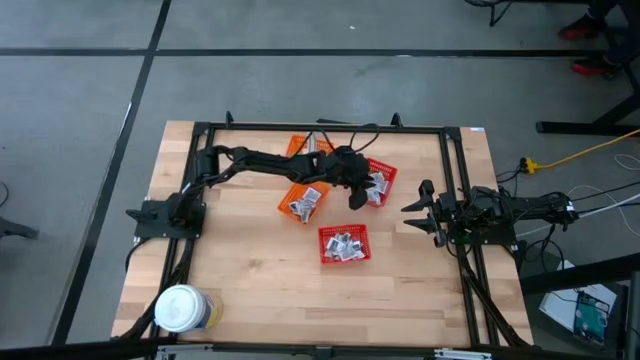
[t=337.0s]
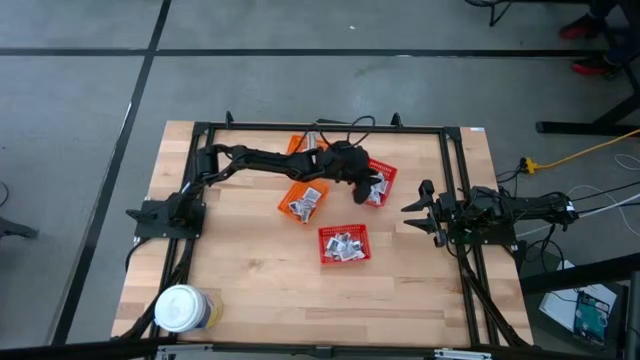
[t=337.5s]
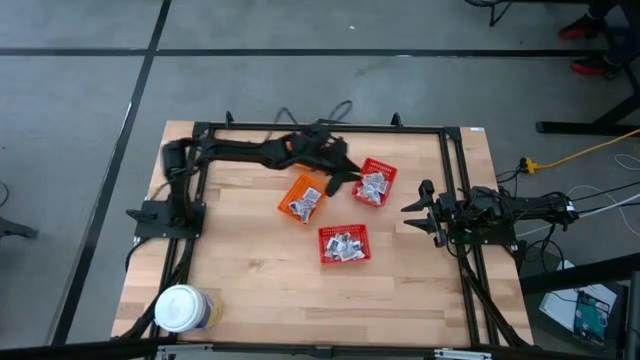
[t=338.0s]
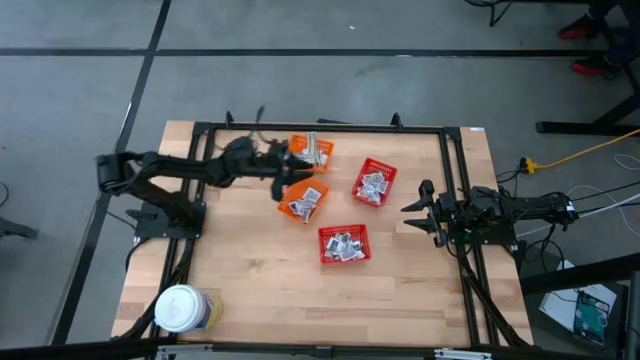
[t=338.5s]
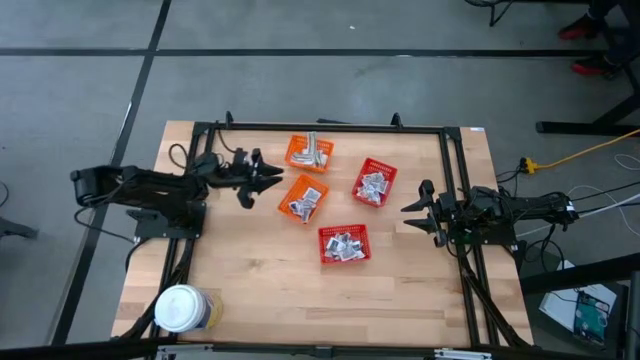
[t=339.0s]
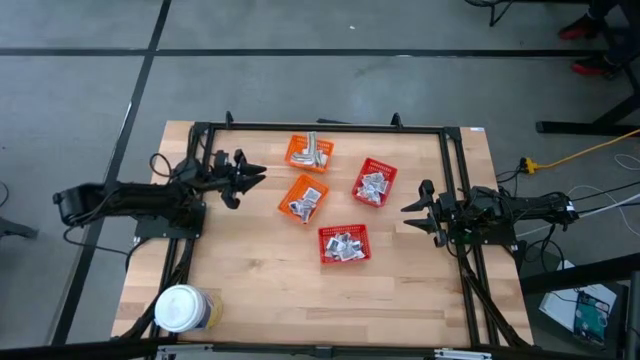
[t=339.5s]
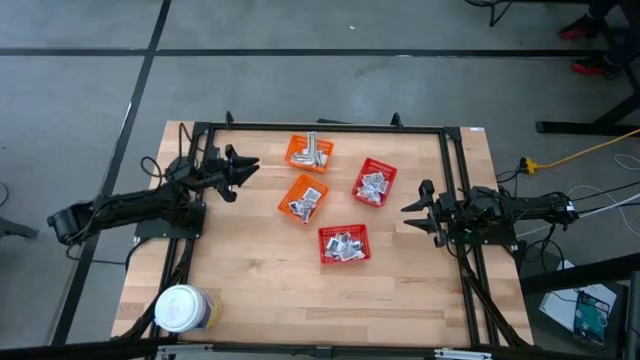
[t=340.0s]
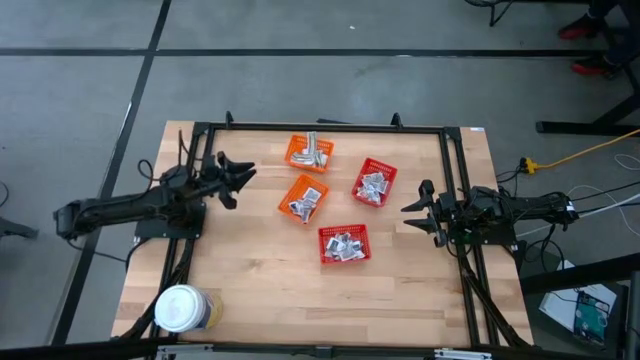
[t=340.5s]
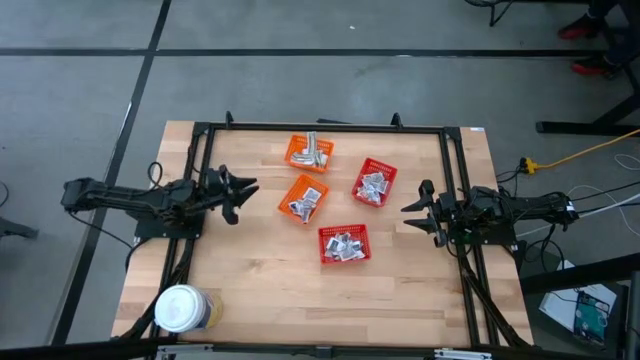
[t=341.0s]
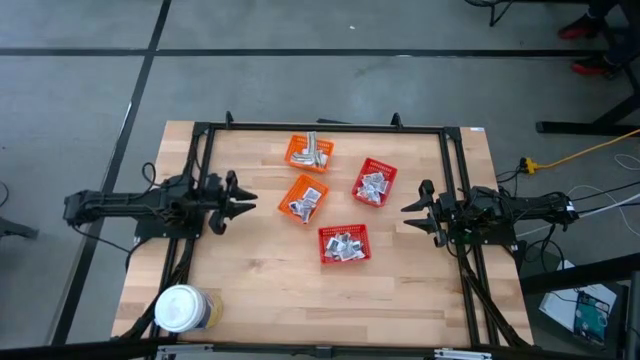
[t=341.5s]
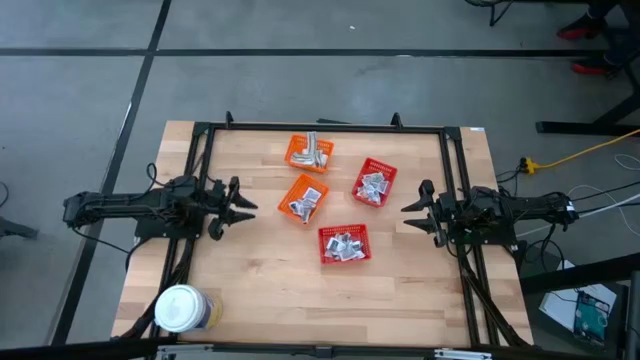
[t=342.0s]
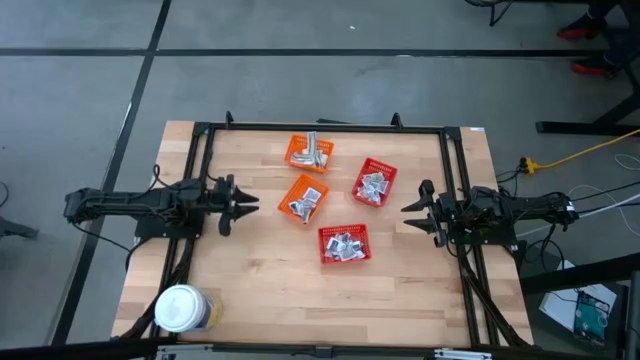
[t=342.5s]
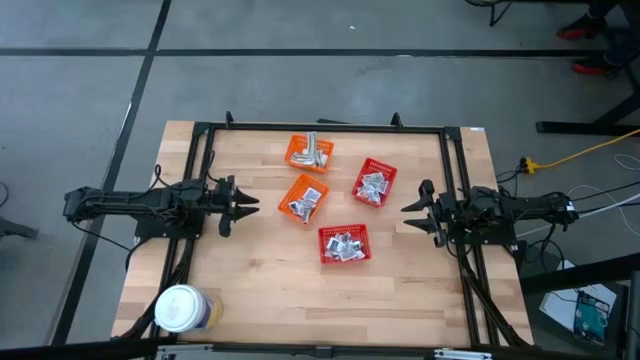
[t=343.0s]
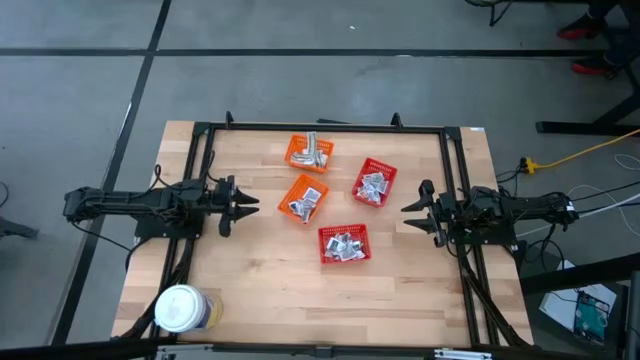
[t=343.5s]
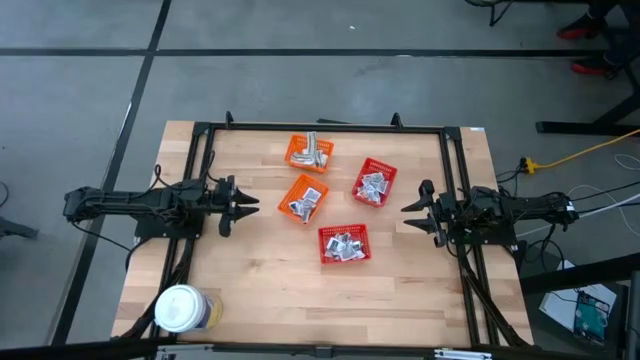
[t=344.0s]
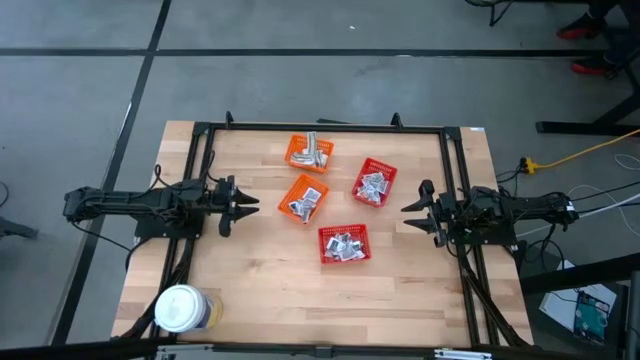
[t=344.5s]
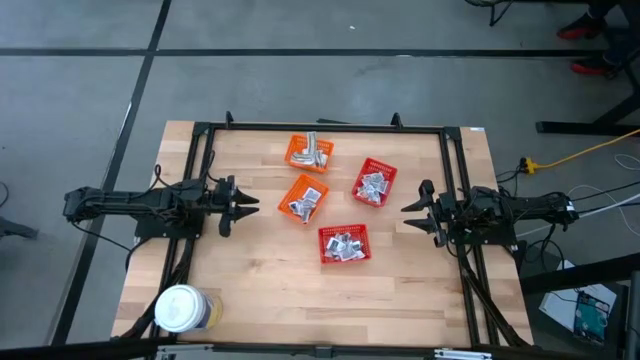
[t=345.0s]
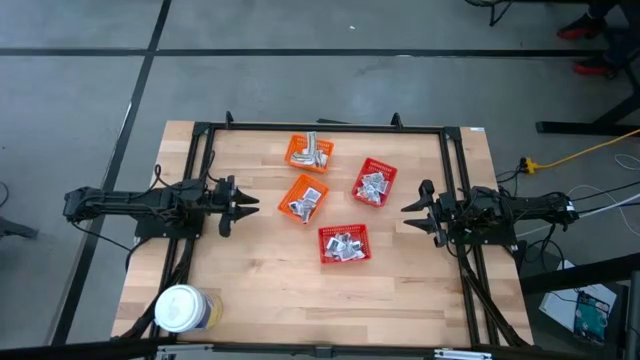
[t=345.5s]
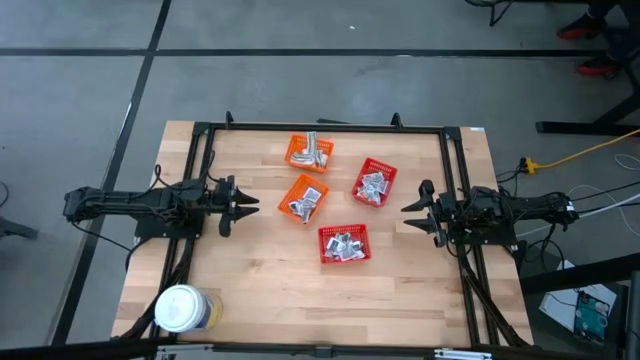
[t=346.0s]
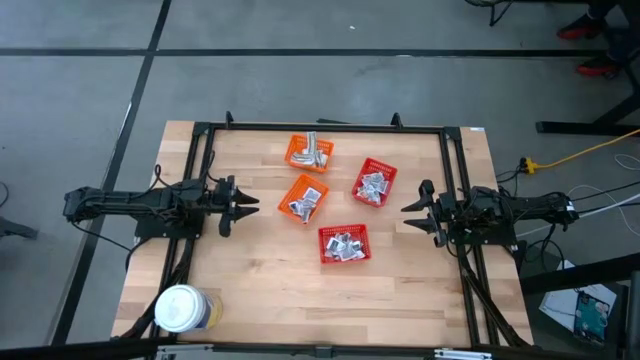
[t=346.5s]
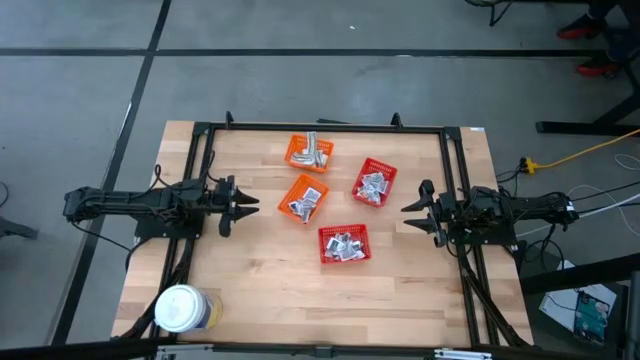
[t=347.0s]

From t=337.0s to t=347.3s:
Task: Pick & Place First Aid Supplies
Return to Home Position

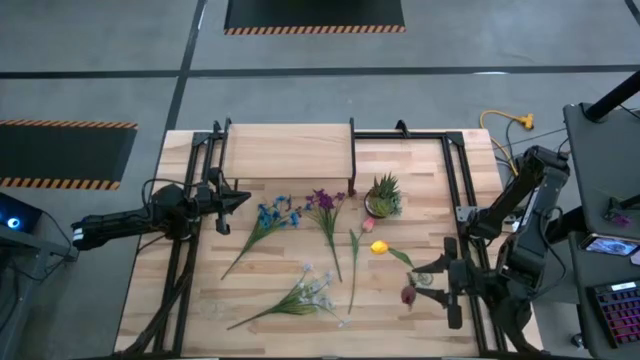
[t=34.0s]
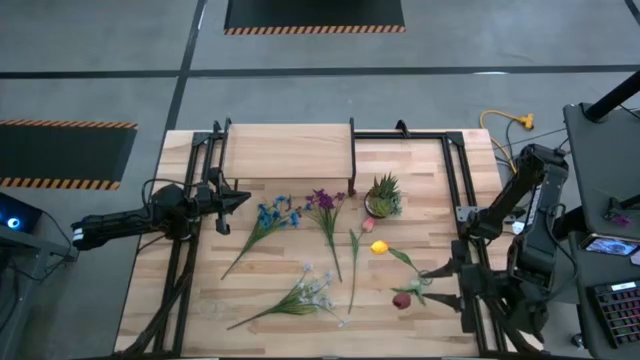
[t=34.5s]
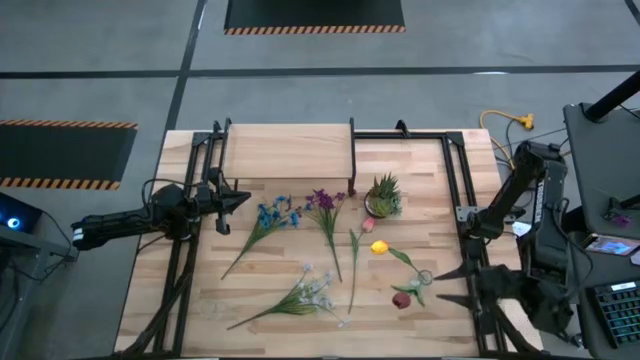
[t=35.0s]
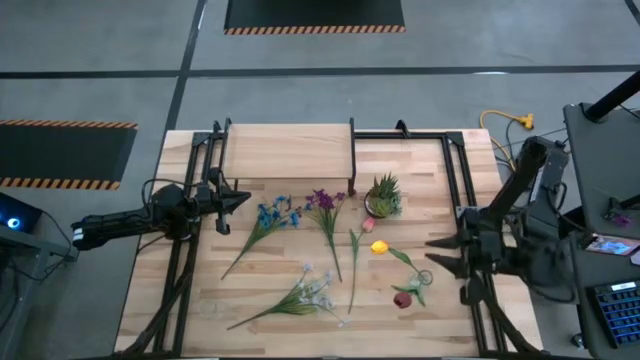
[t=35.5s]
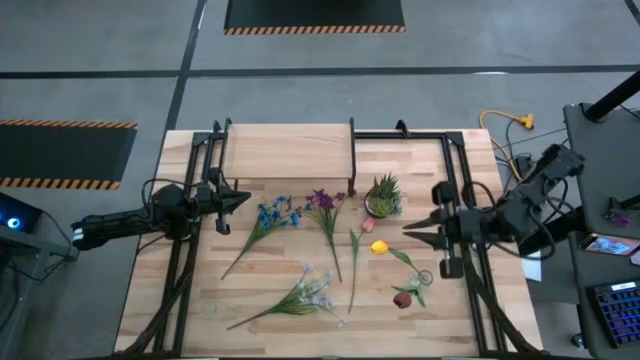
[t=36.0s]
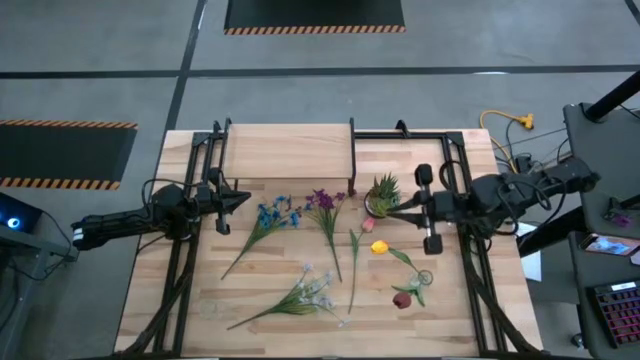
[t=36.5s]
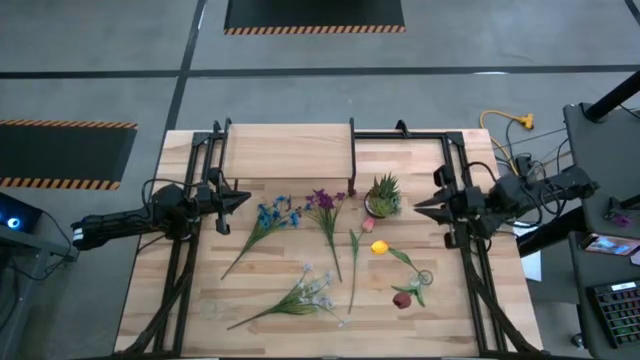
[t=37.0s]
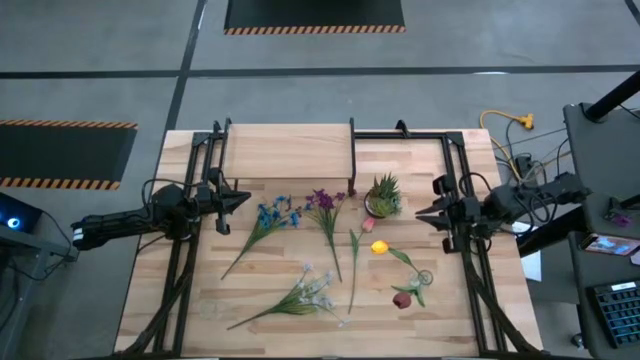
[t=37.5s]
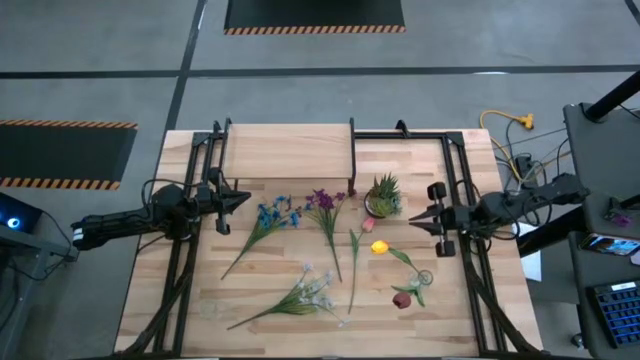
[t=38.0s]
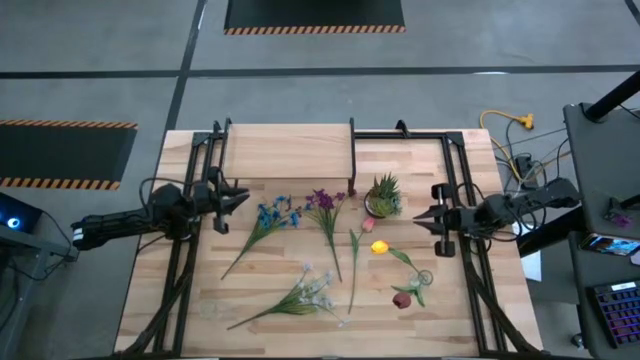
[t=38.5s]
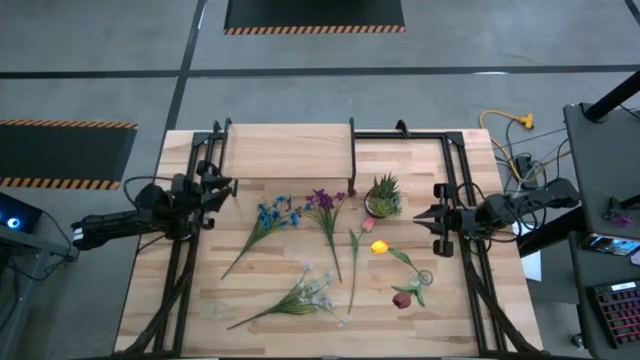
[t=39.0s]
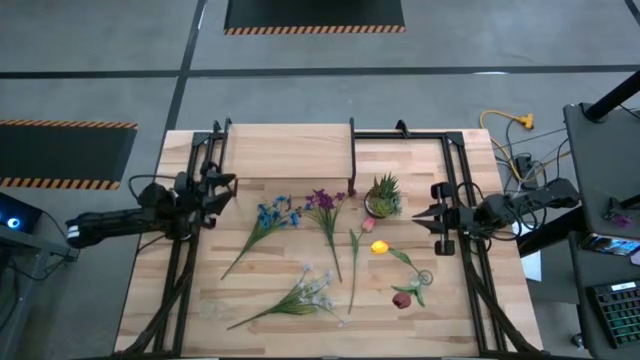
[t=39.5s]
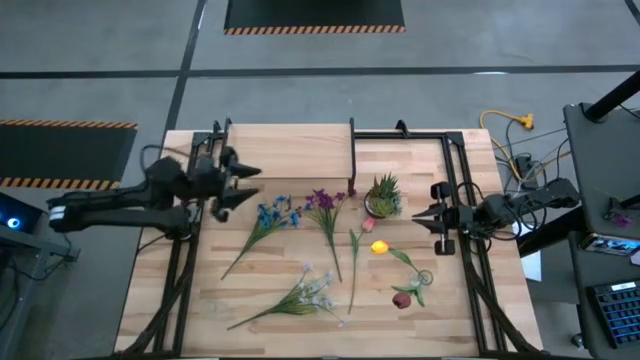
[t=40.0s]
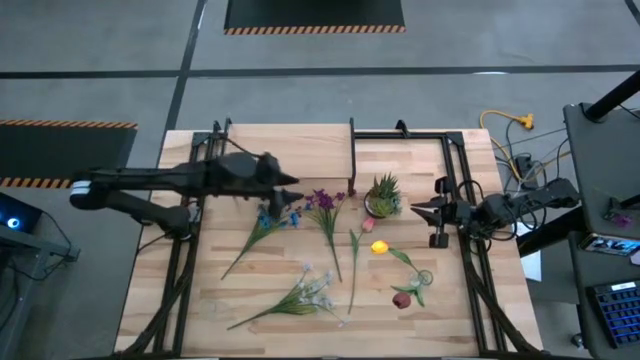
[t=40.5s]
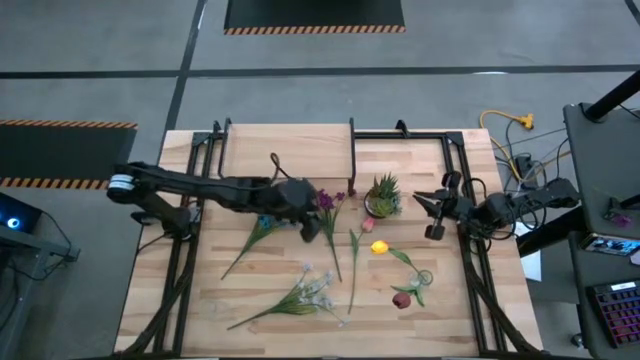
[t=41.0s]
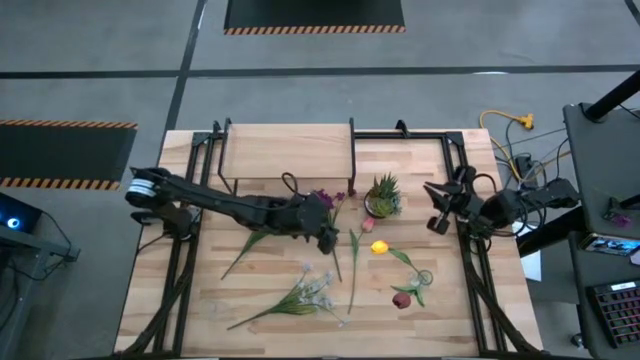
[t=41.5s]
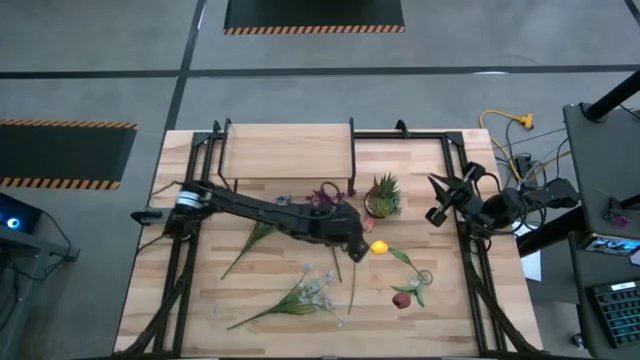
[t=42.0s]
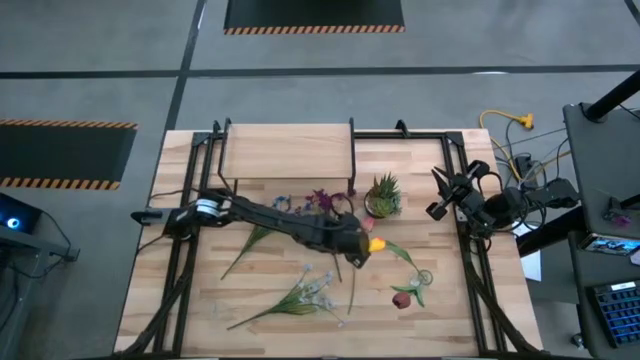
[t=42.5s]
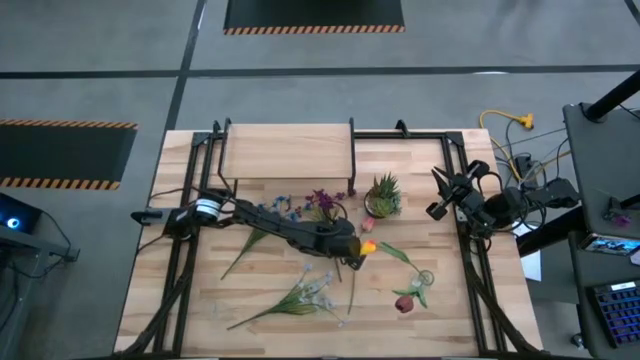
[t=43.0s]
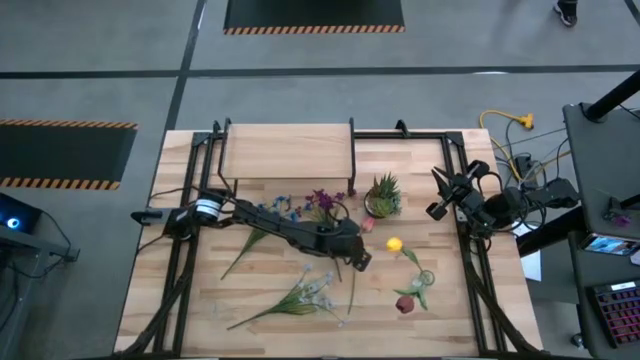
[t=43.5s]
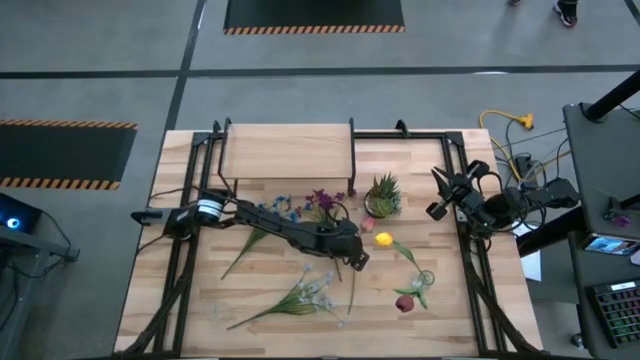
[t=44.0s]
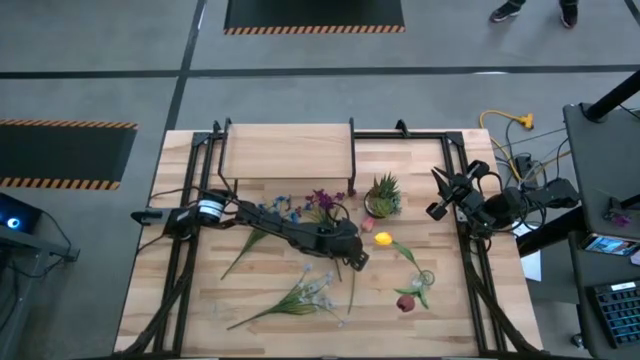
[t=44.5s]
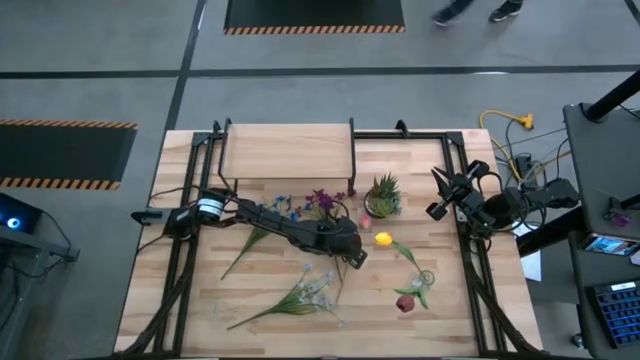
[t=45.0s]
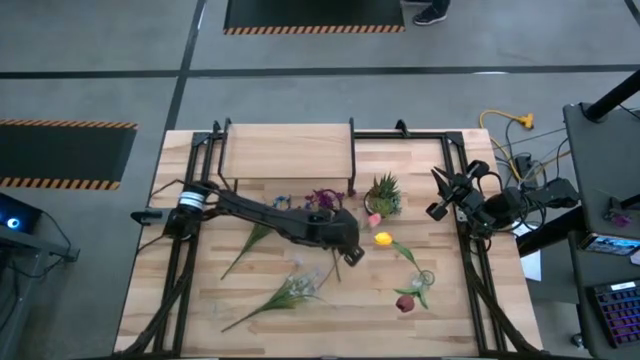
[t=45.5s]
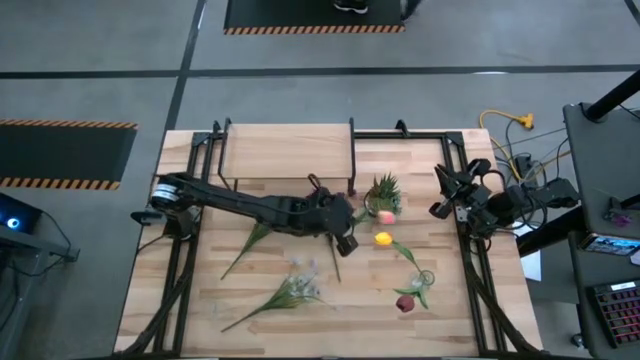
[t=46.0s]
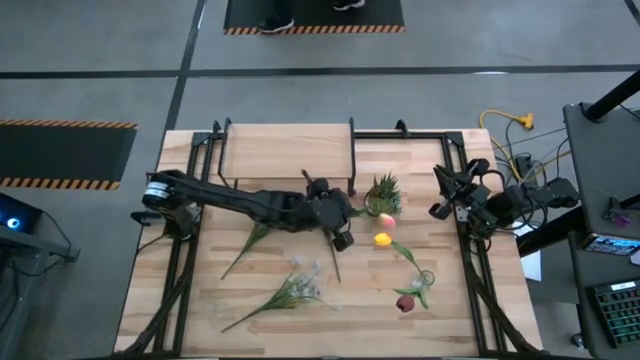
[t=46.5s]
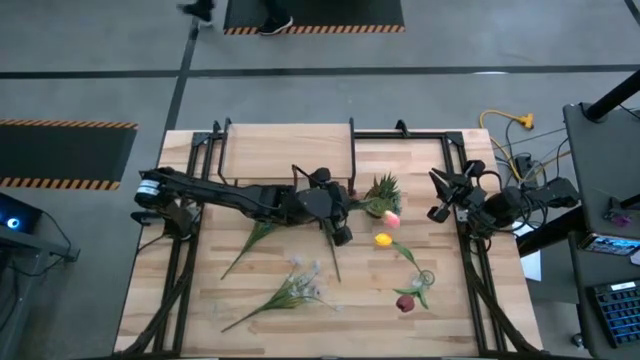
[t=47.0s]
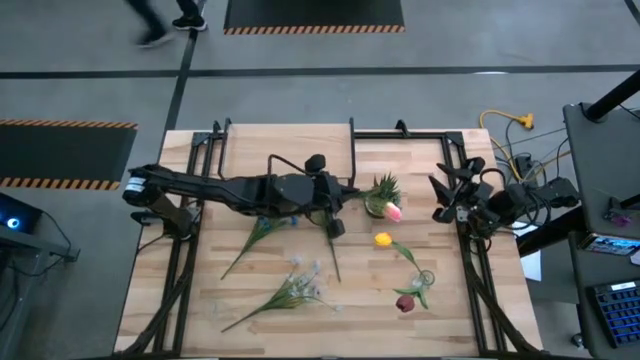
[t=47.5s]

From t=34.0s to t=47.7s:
Task: Pick and place flowers into a vace then onto a shelf
Put the pink tulip into the right transparent vase
